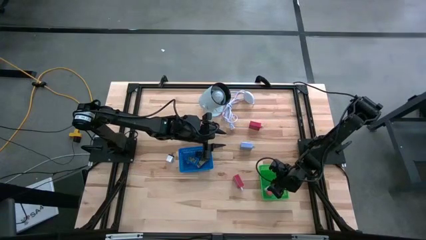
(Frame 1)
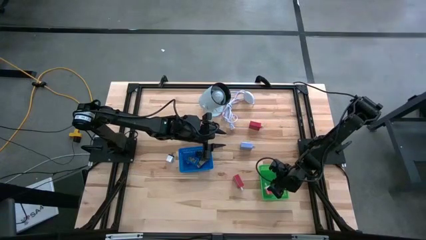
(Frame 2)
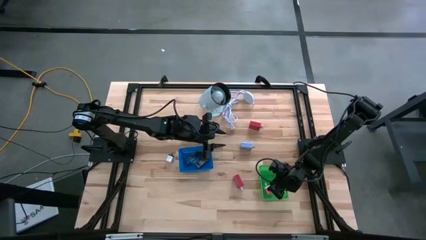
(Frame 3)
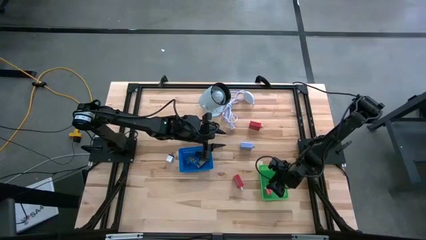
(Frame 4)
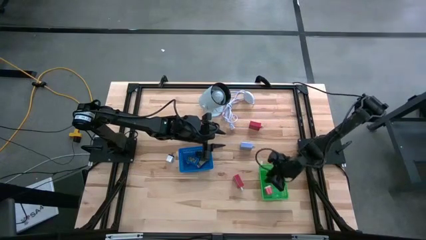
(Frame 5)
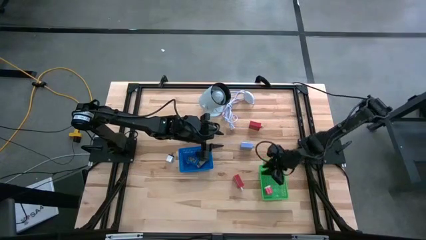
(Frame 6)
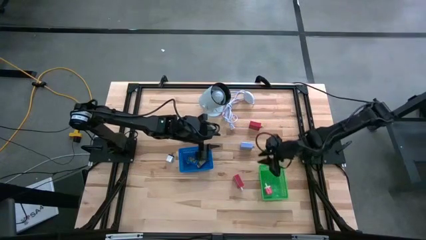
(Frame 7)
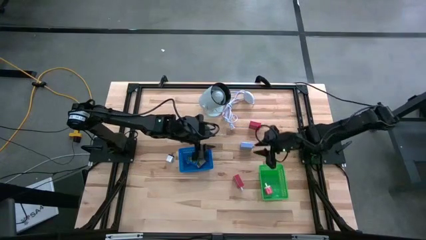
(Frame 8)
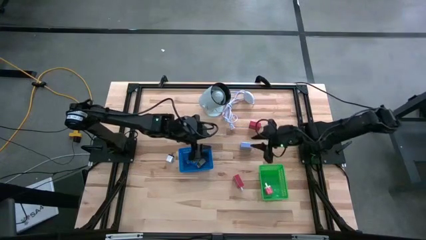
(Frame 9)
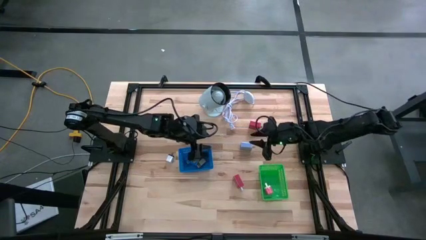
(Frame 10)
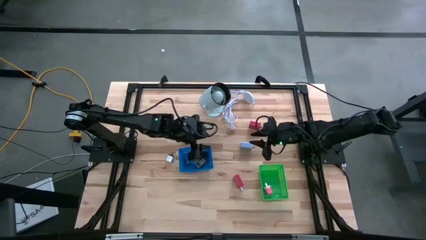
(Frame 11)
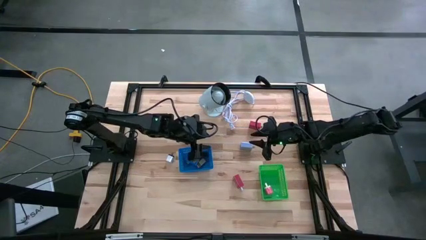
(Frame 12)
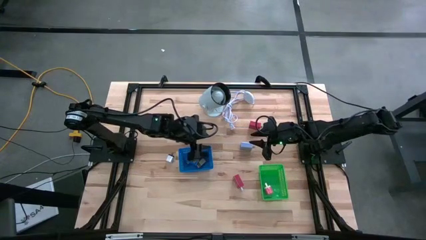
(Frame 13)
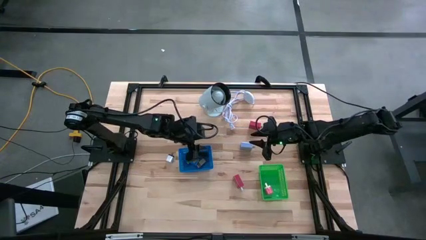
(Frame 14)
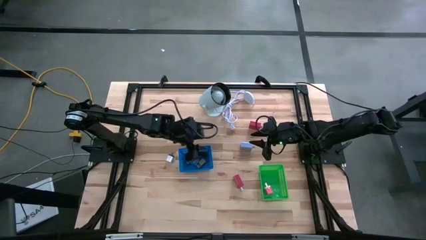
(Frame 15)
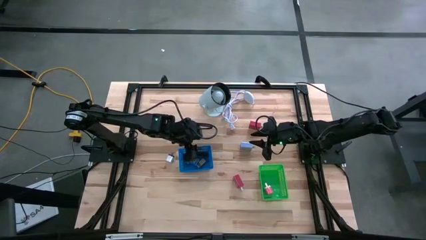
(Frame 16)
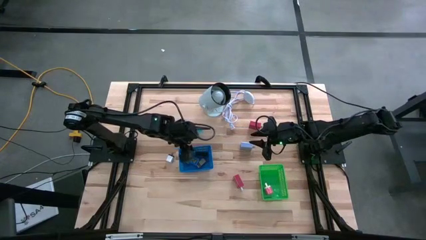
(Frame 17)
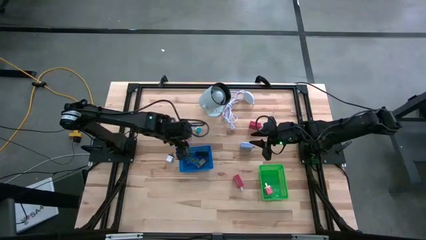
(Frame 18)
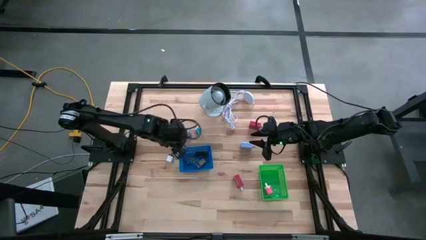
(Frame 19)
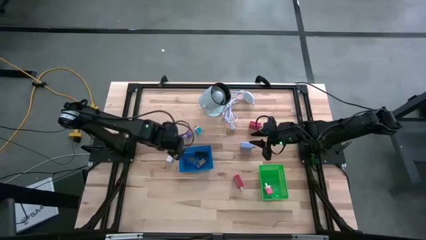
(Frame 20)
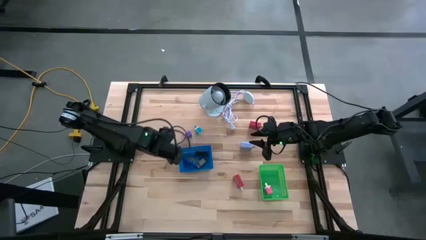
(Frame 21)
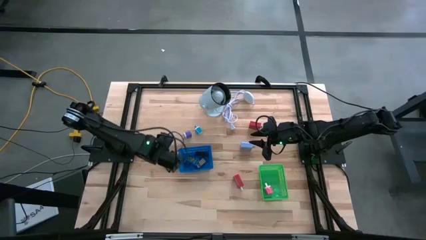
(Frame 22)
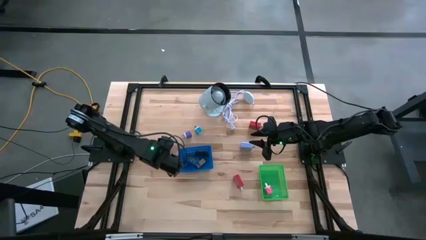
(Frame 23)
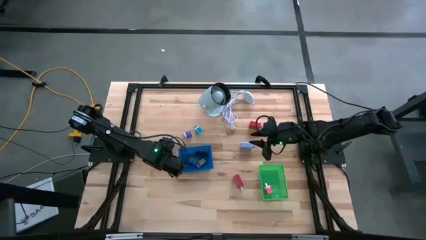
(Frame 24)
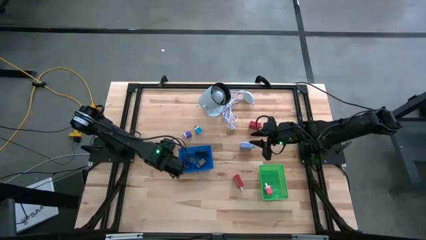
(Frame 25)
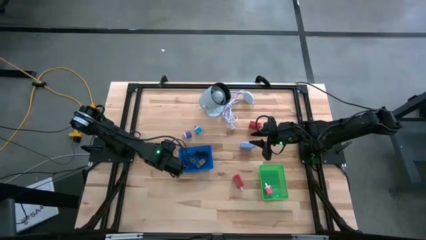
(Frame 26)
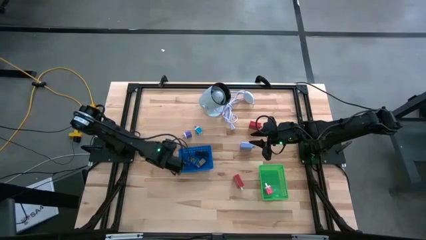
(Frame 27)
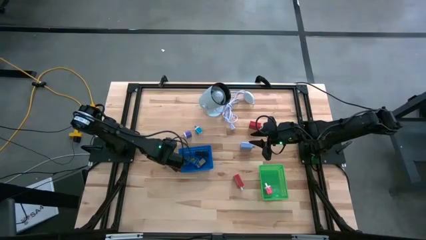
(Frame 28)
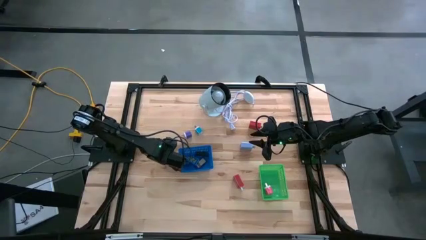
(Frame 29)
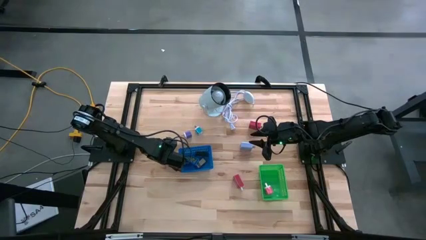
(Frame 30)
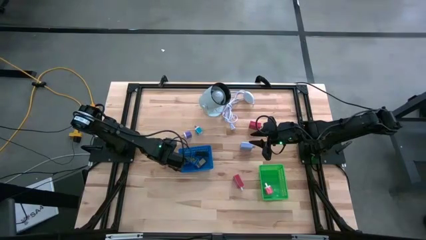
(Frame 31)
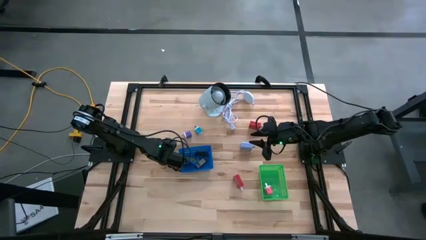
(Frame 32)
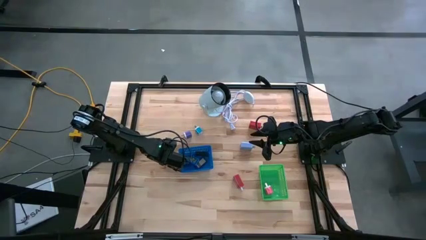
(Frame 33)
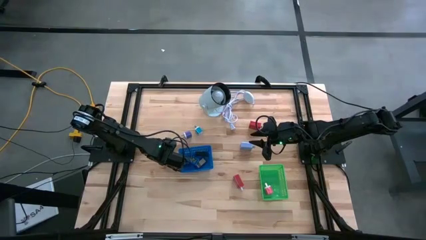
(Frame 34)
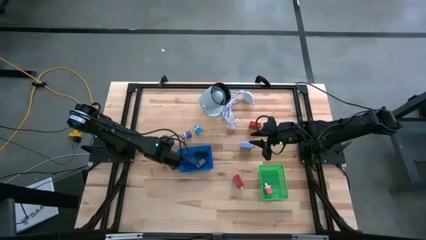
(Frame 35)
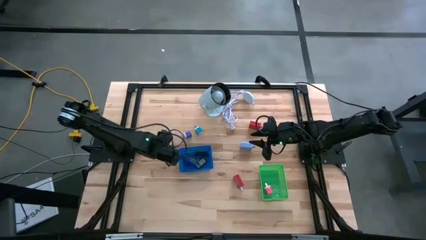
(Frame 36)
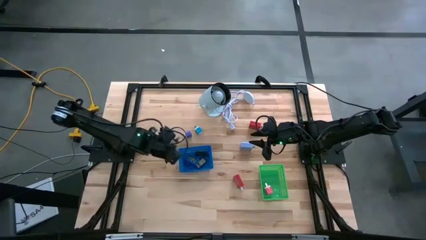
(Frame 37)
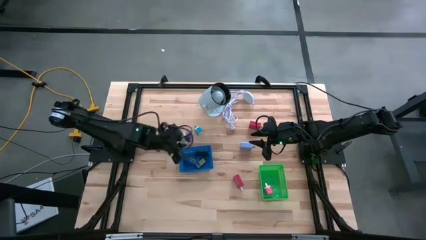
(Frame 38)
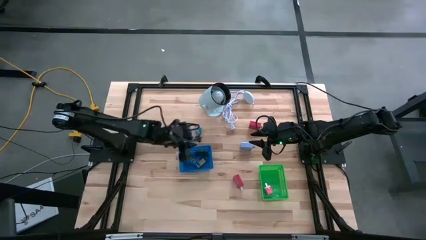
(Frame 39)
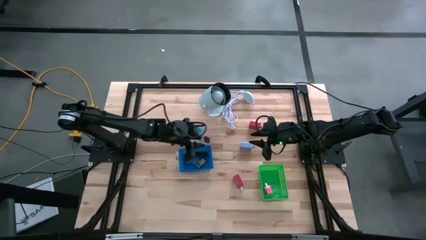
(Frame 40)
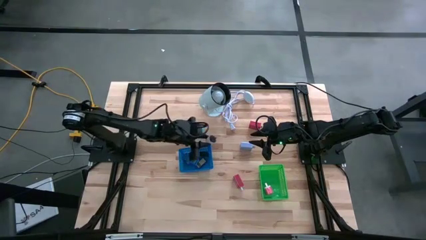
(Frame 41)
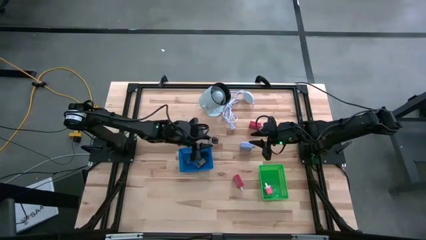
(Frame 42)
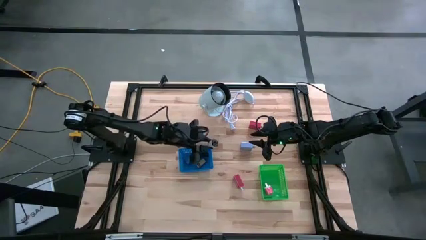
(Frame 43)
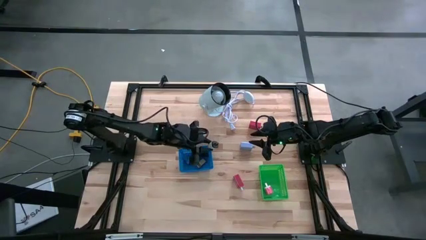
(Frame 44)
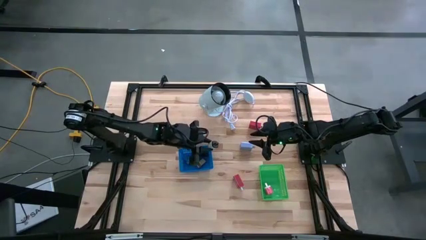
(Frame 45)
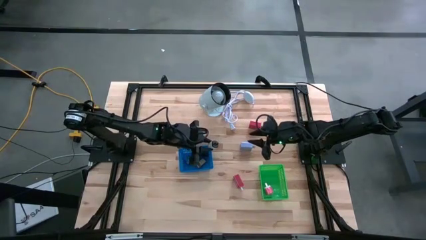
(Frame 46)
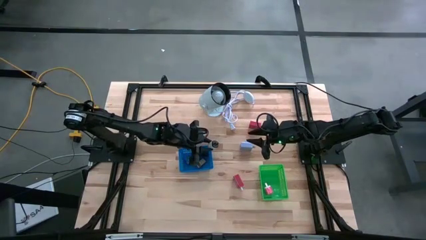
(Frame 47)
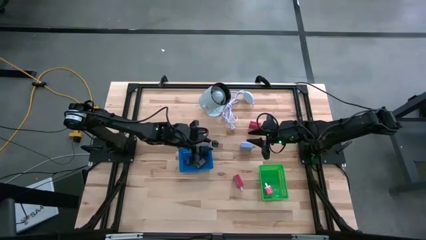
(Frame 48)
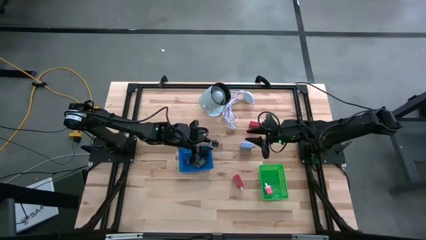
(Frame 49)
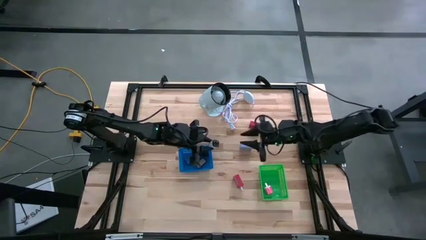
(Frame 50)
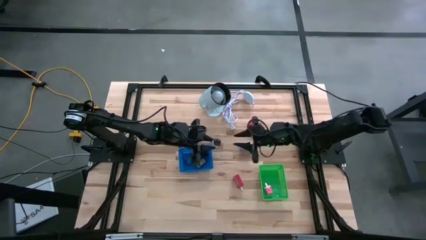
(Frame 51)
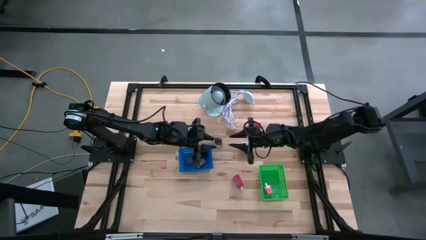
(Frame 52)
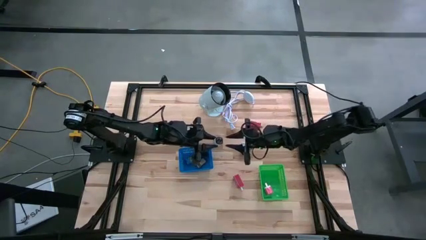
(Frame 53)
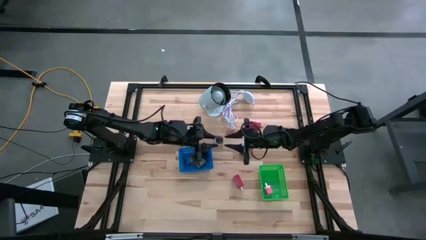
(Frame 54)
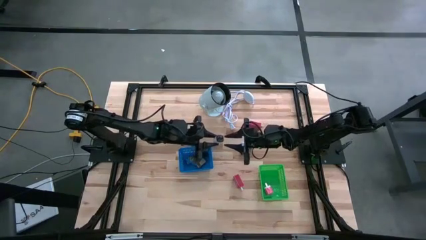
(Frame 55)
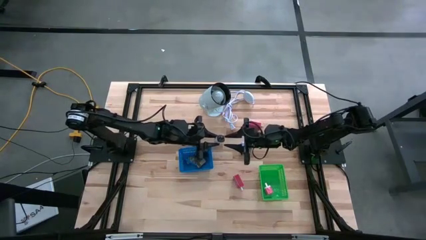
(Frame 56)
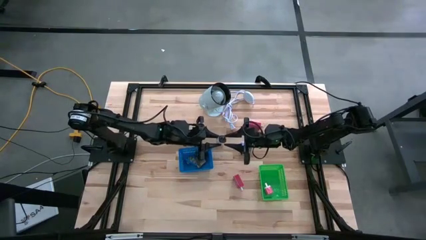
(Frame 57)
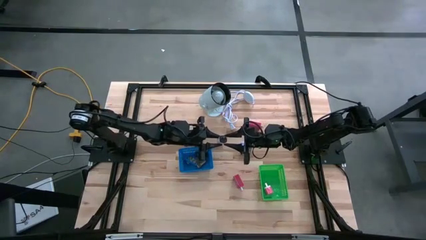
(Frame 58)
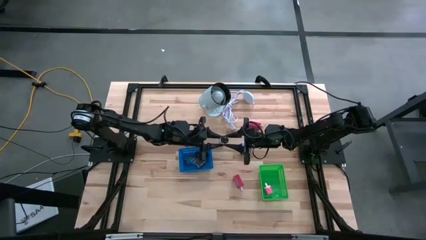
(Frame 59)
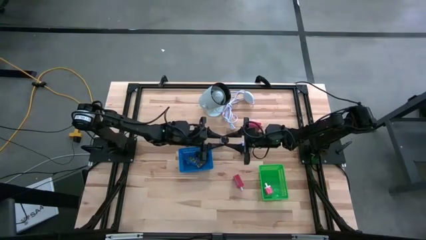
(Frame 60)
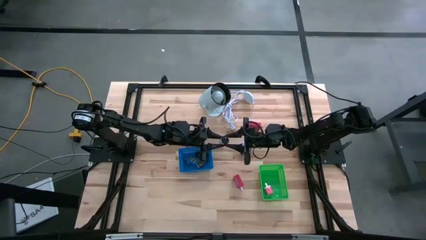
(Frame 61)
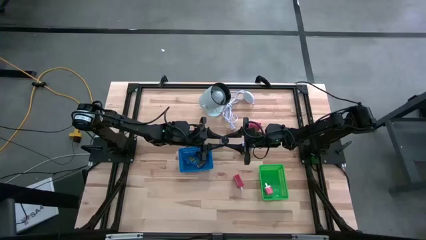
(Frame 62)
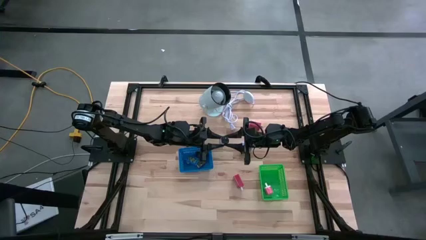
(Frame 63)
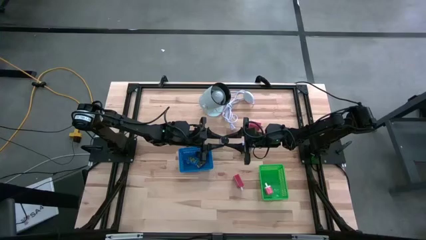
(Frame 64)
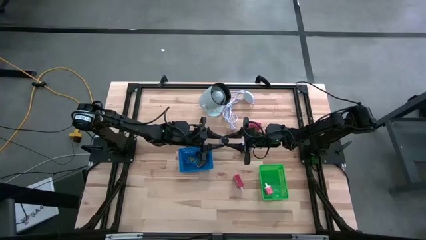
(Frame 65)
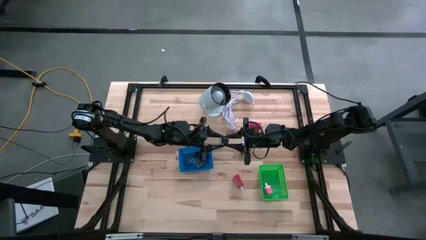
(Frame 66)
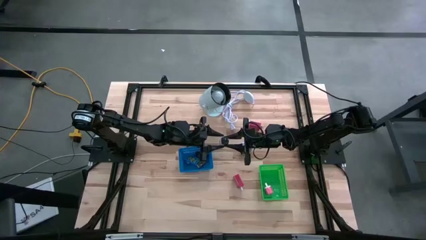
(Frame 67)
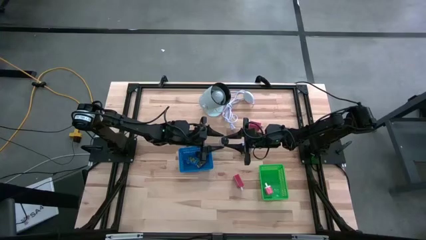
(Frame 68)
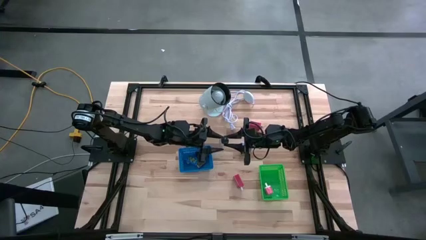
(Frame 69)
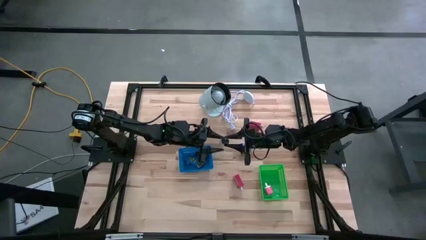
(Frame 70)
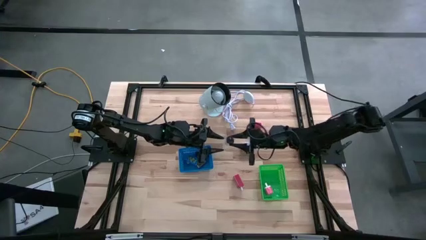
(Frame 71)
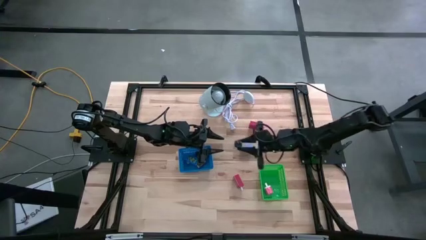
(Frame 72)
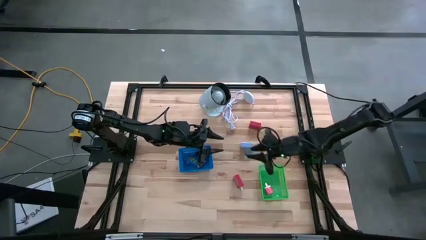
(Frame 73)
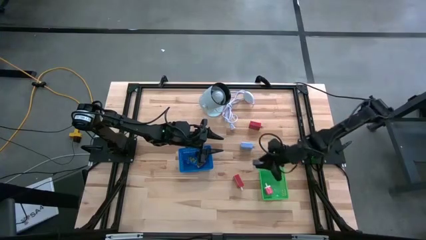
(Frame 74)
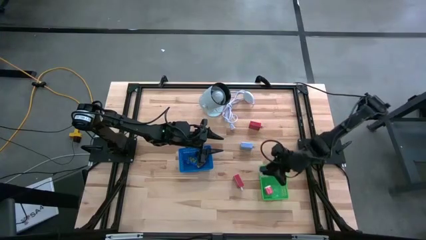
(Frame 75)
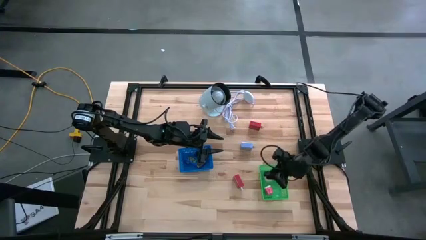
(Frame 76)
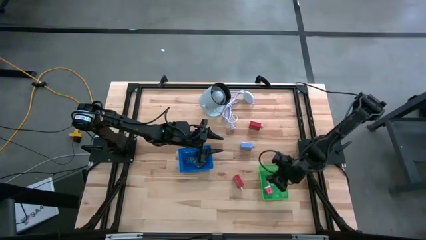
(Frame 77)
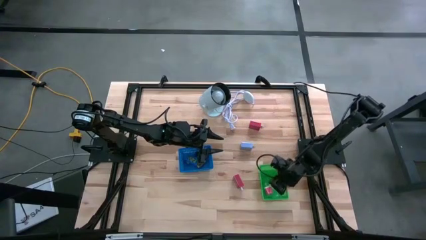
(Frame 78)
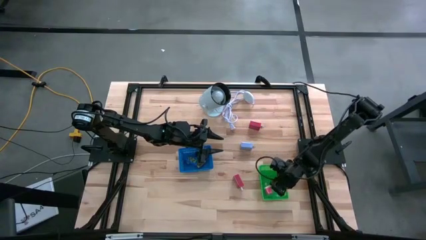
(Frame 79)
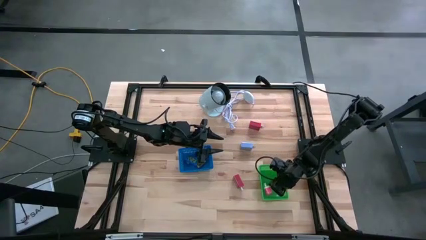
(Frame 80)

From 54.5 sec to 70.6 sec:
Task: Pick & Place Office items
Put the white charger adapter into the green bin
